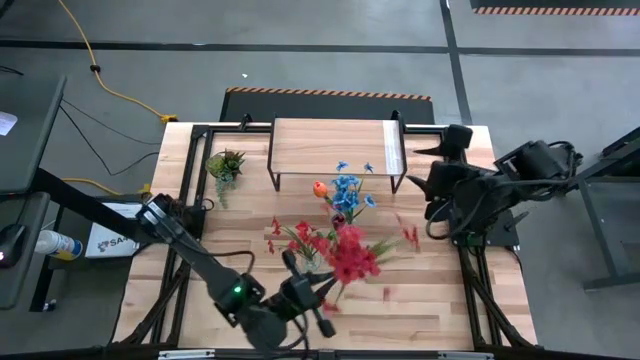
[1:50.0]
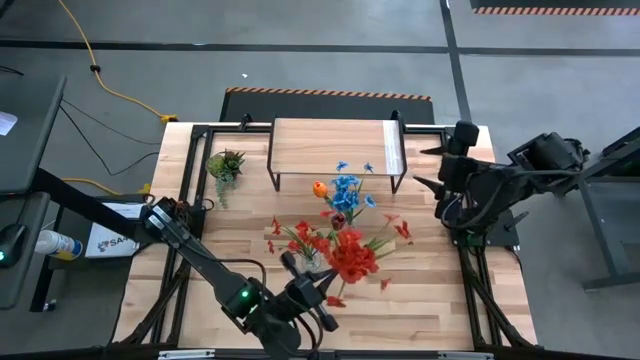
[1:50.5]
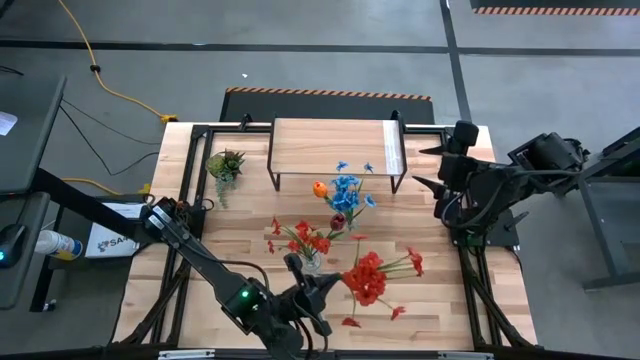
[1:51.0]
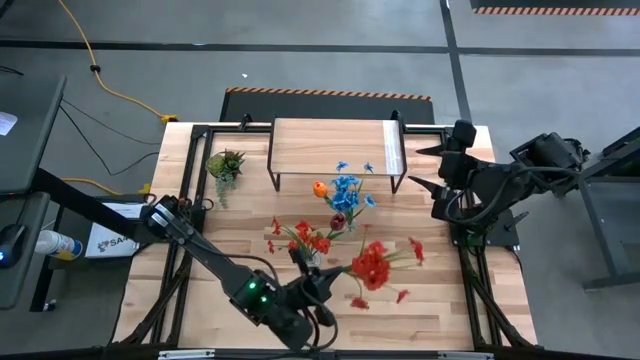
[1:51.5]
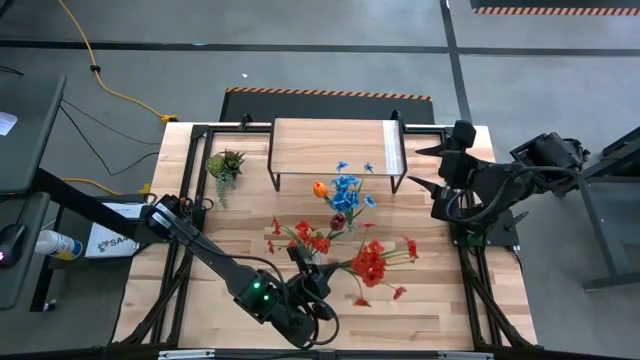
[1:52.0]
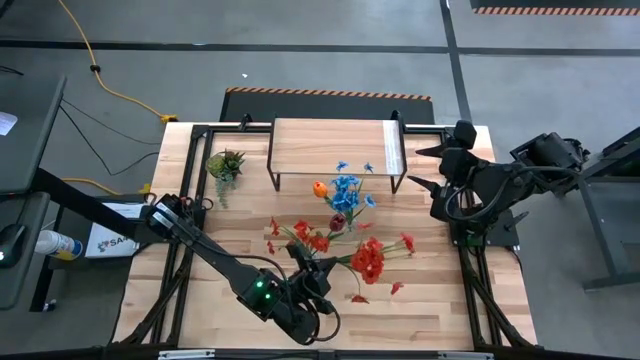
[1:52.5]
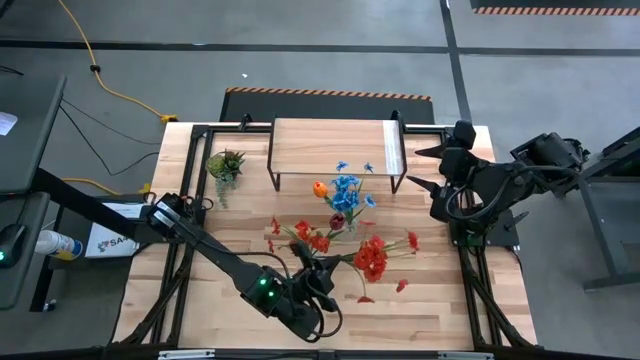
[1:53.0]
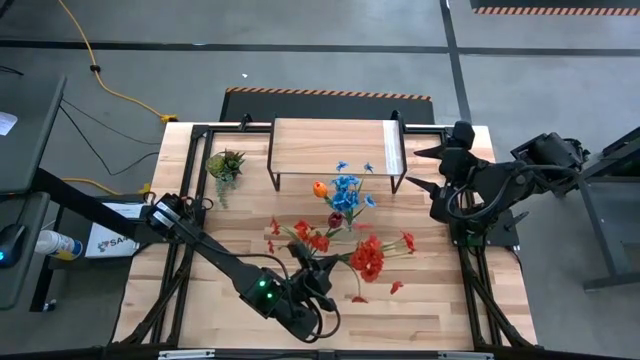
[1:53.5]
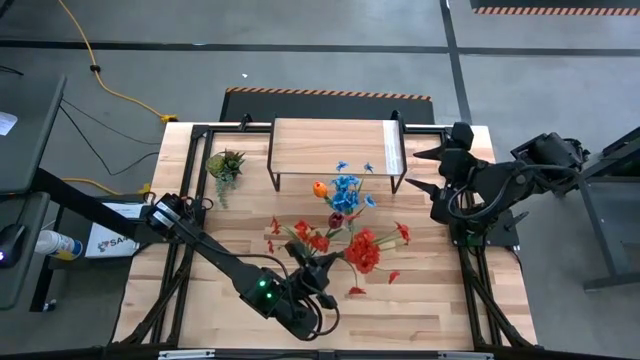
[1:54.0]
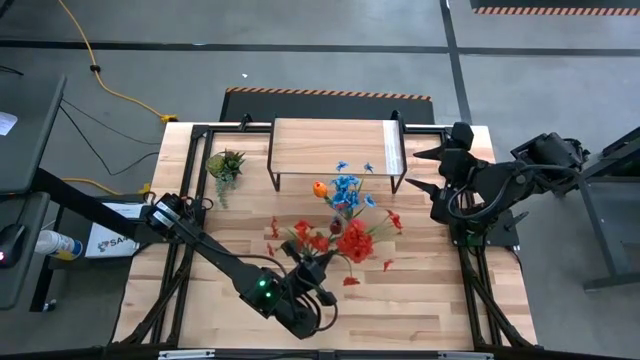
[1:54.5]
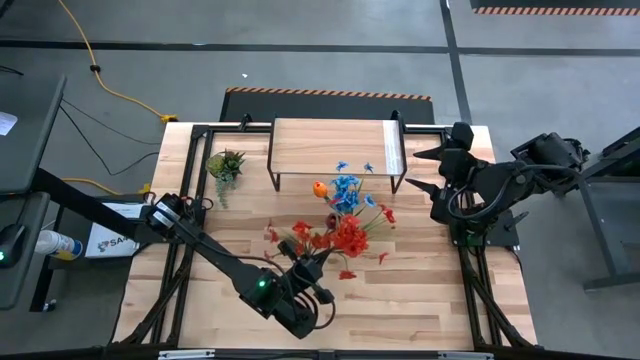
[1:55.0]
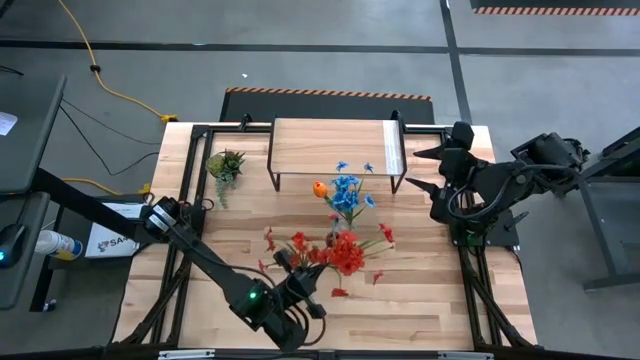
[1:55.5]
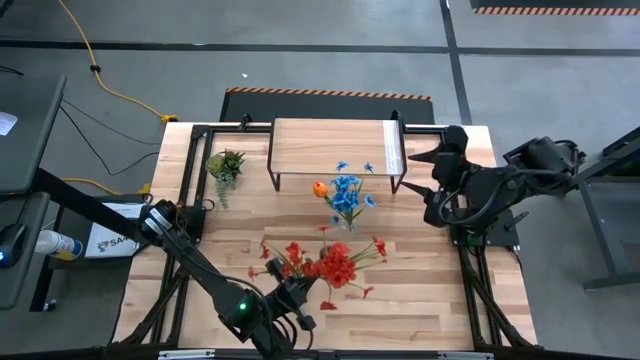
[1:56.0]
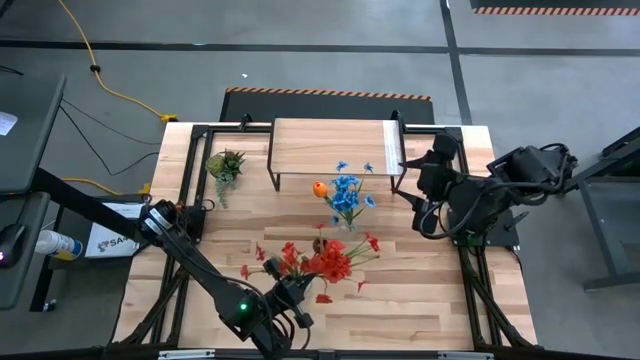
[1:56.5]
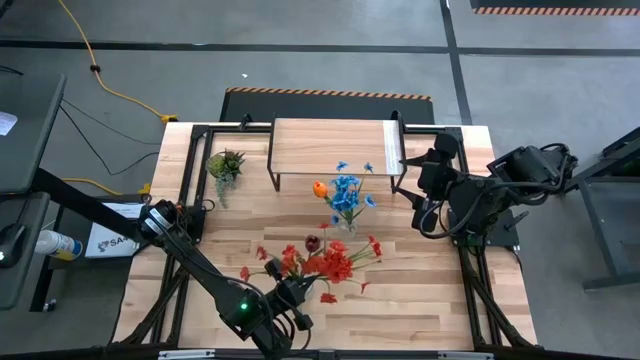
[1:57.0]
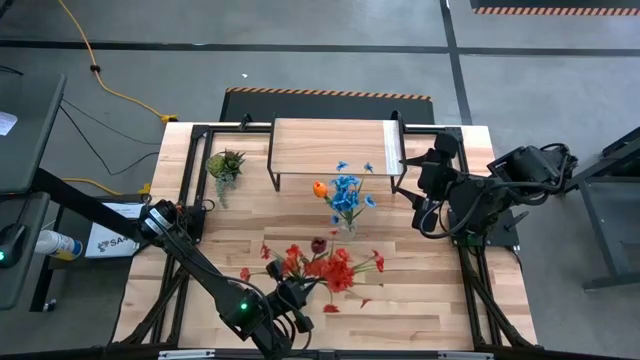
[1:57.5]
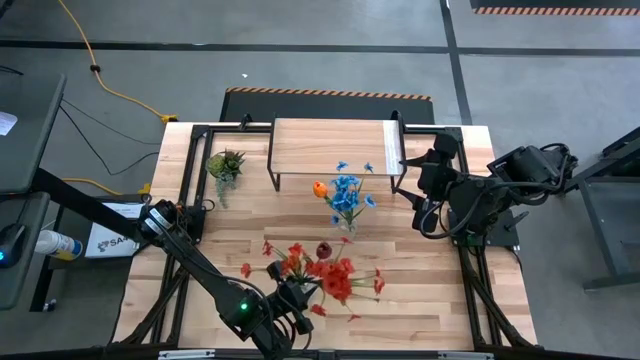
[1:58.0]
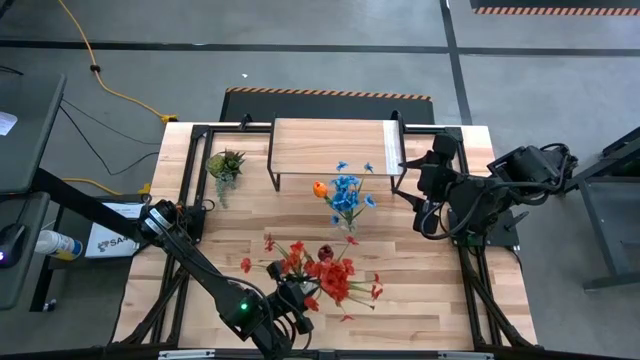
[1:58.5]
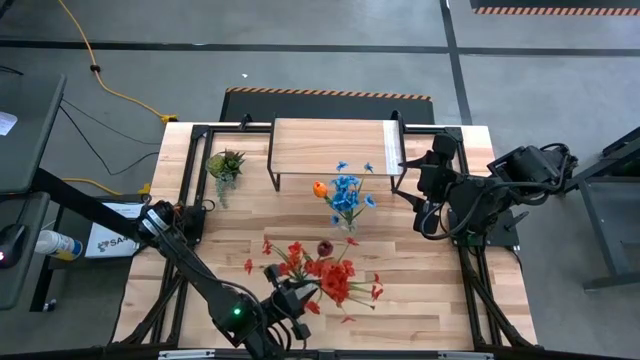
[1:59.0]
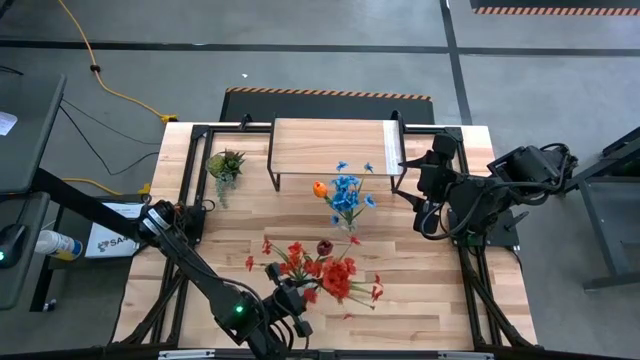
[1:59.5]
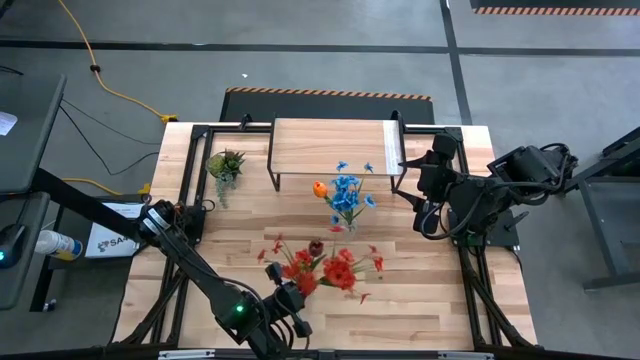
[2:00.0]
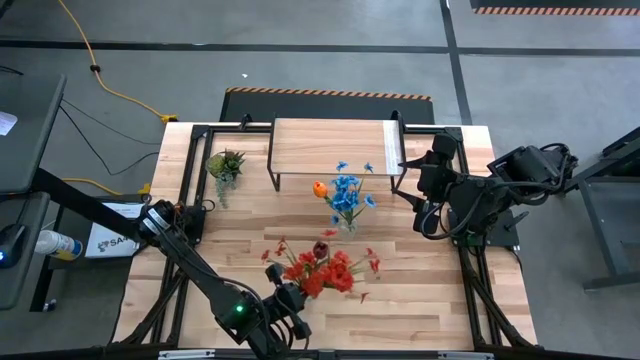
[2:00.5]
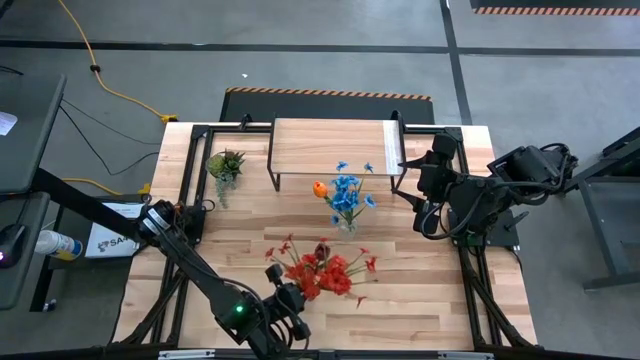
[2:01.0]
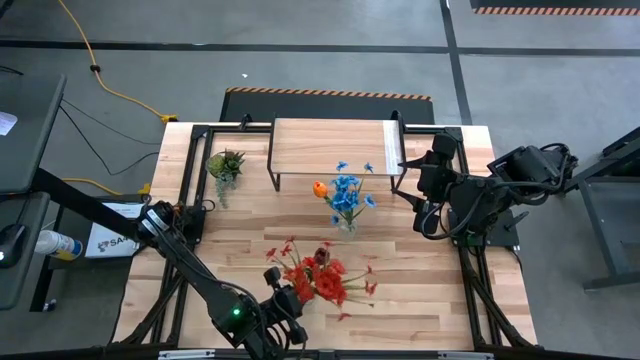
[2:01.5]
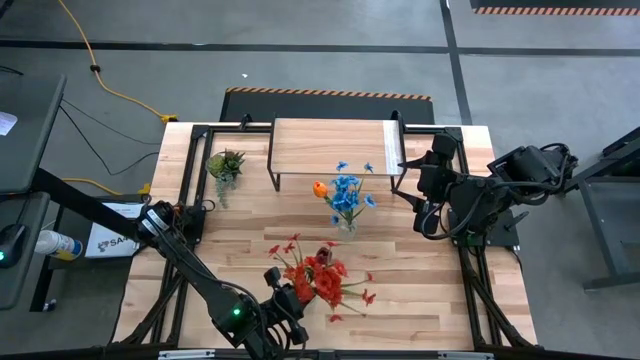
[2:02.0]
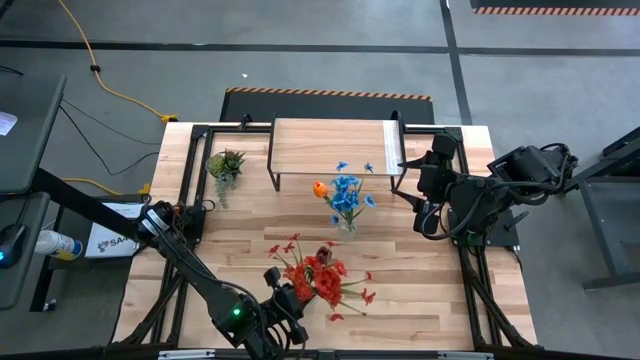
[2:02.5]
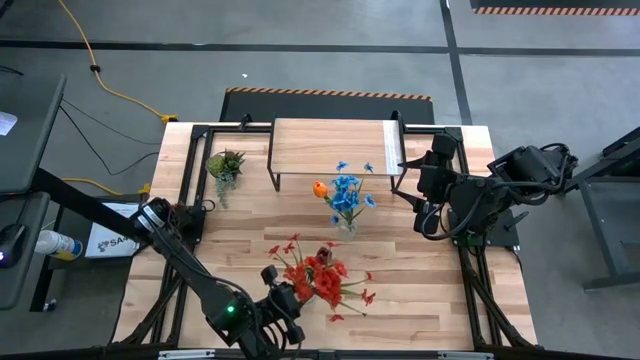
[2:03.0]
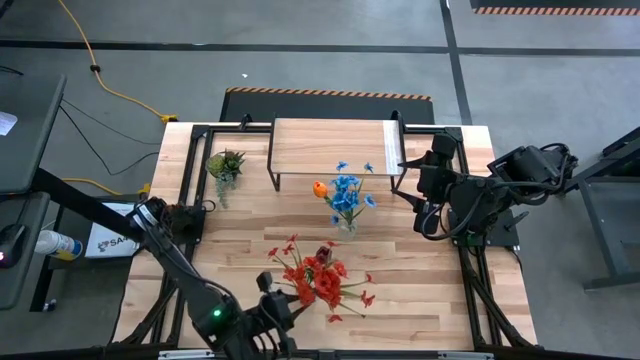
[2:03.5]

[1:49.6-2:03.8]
Task: Pick and place flowers into a vace then onto a shelf
Put the orange flowers into the bottom transparent vase

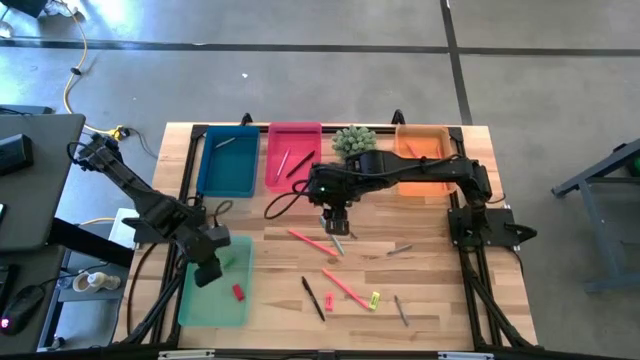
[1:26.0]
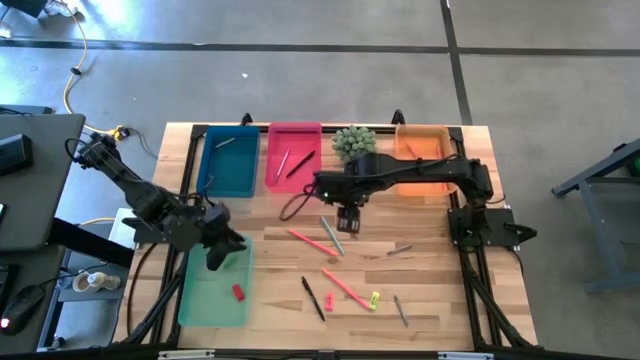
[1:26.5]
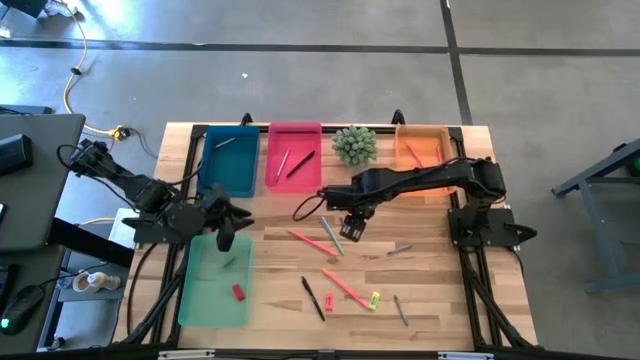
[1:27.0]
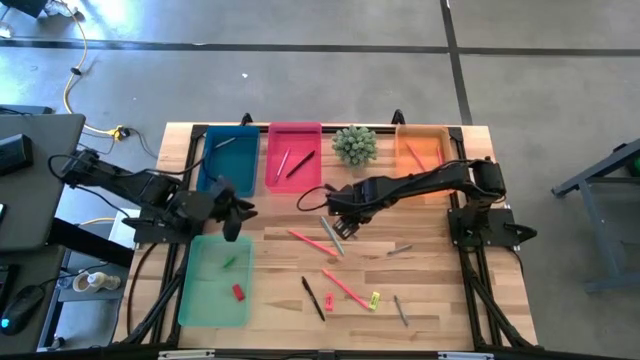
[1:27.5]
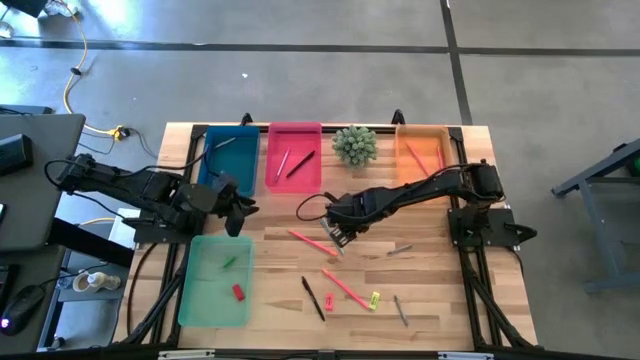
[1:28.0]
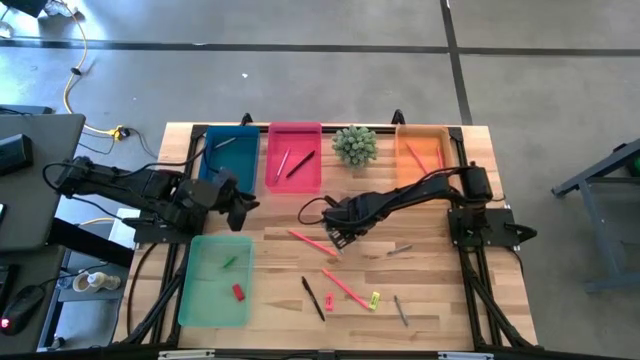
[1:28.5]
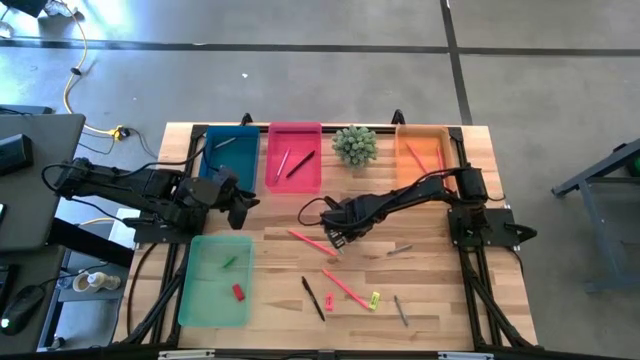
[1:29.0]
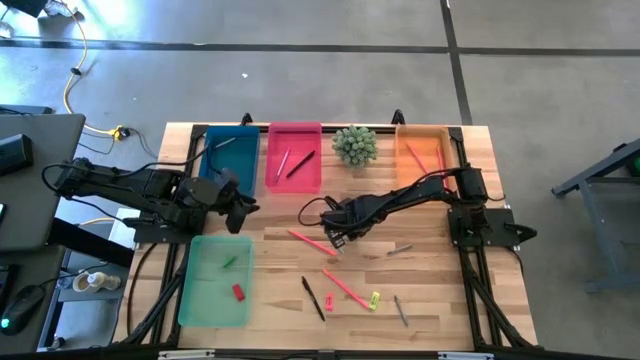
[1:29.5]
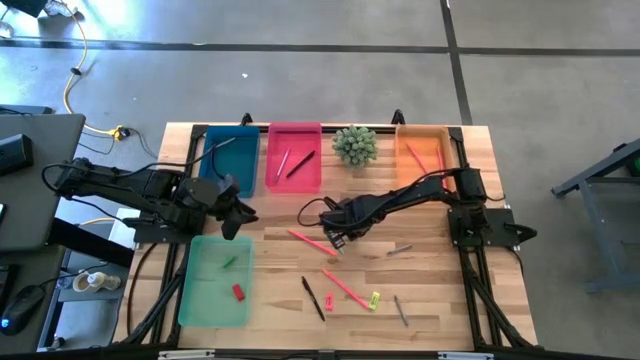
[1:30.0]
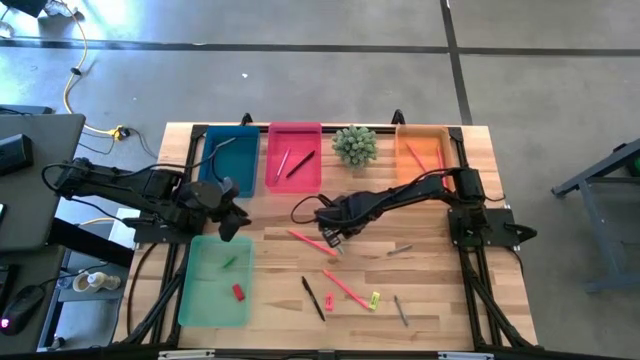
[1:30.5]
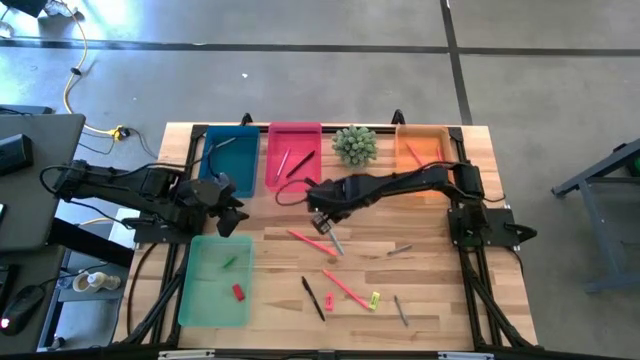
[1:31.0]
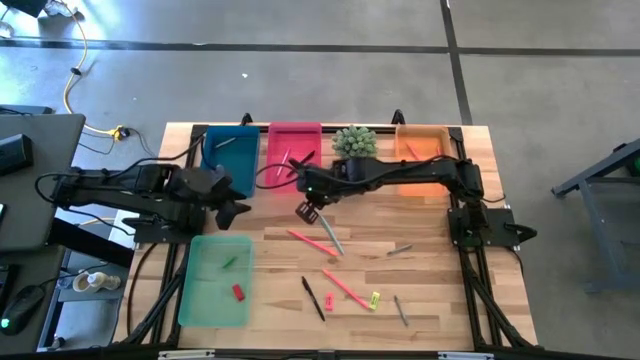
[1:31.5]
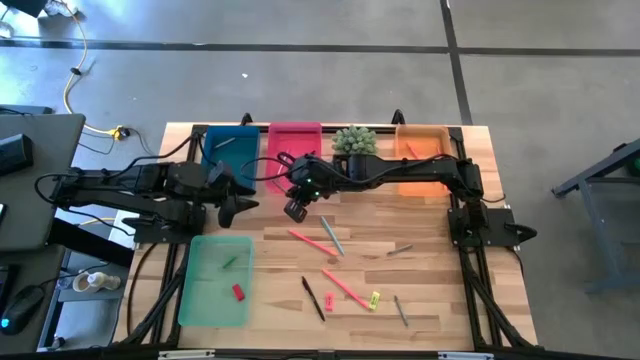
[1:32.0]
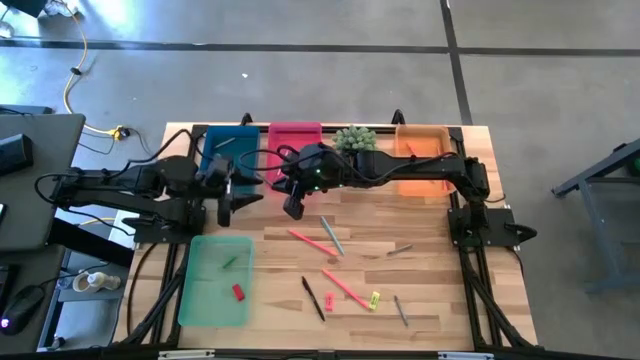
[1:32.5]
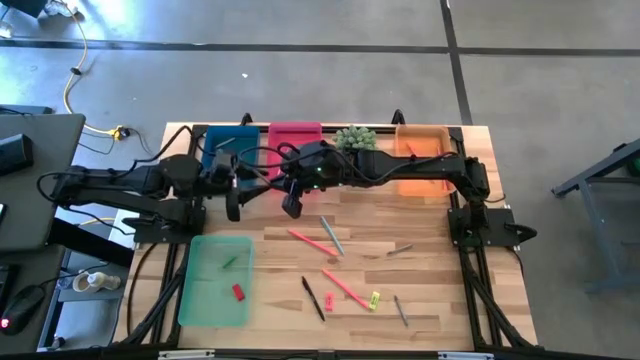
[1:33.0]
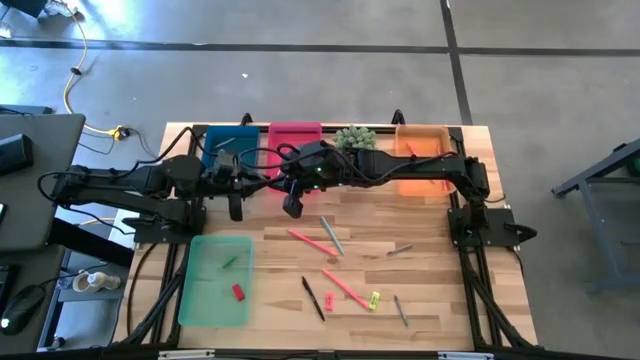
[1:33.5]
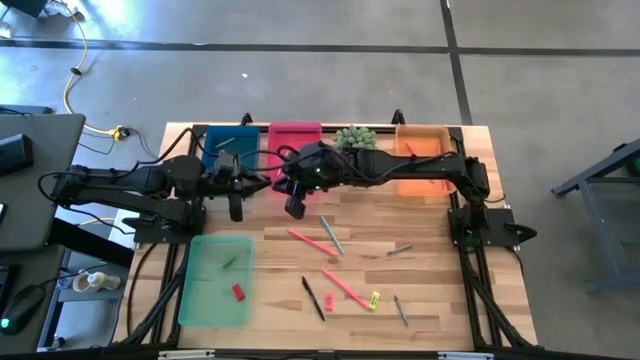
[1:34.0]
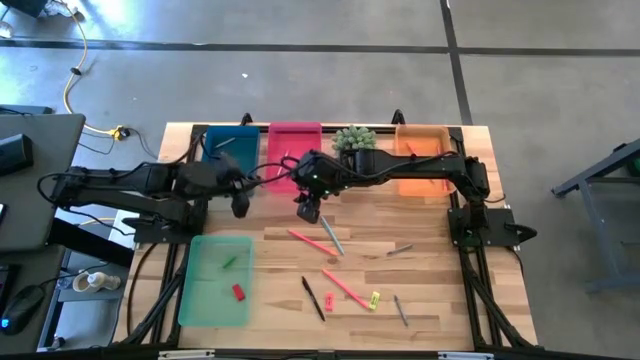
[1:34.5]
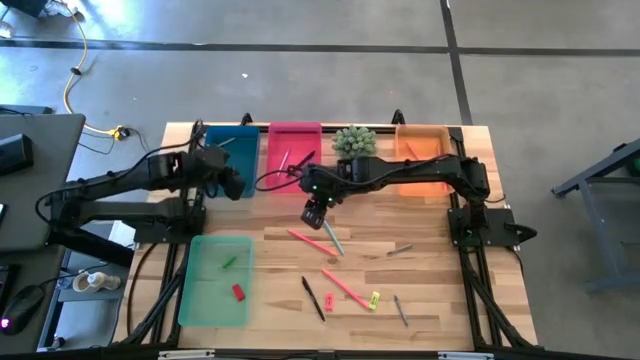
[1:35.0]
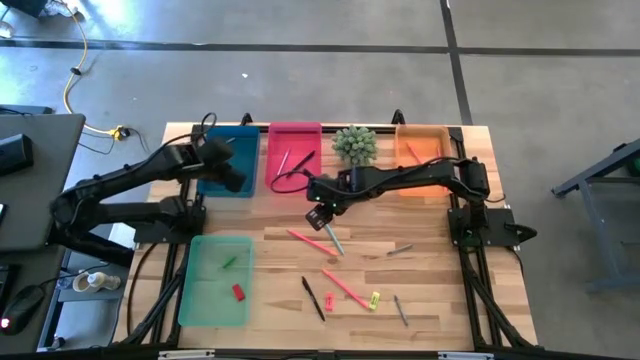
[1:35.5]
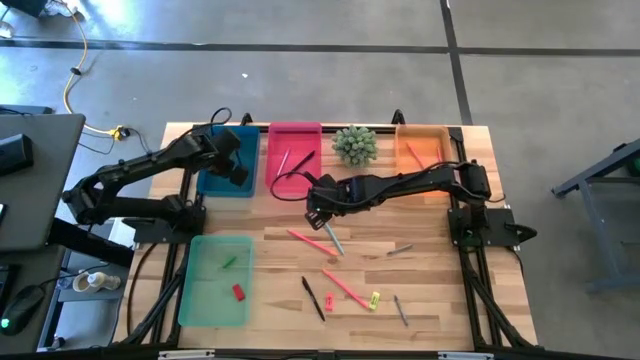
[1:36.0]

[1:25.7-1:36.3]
Task: Sort crayons/erasers/pens/pencils in bins
Put the gray crayon into the blue bin
